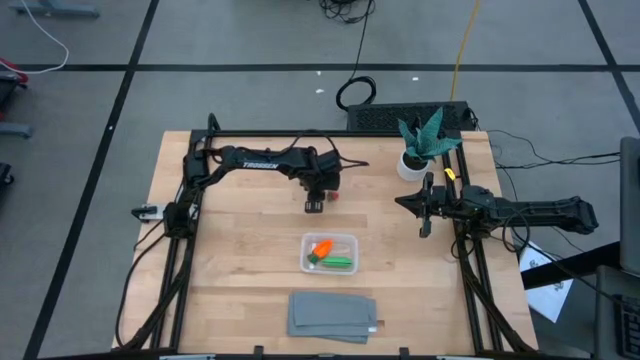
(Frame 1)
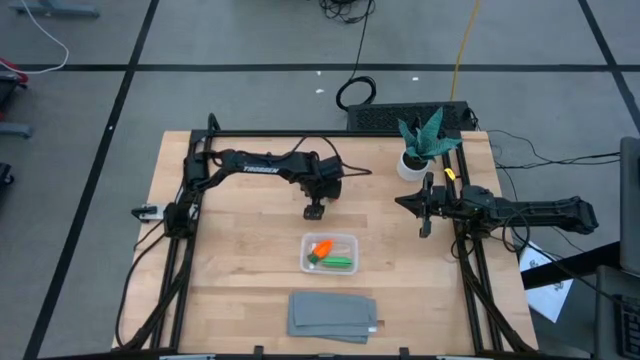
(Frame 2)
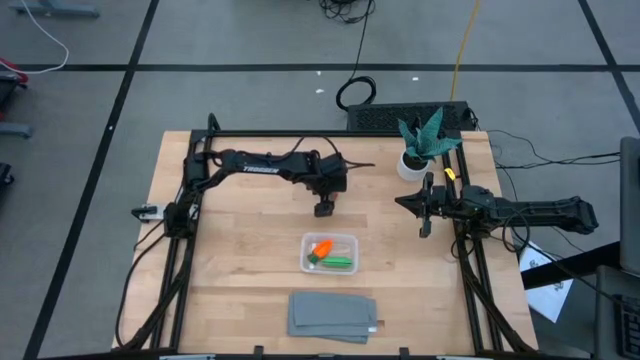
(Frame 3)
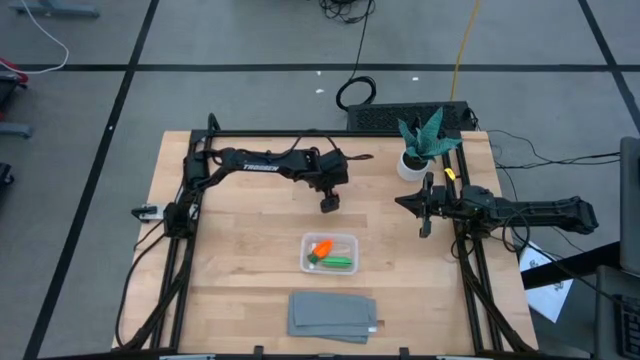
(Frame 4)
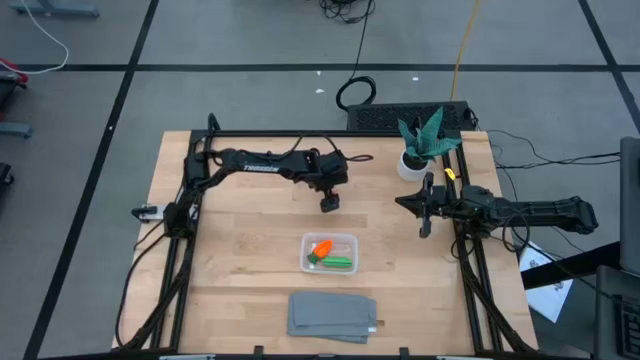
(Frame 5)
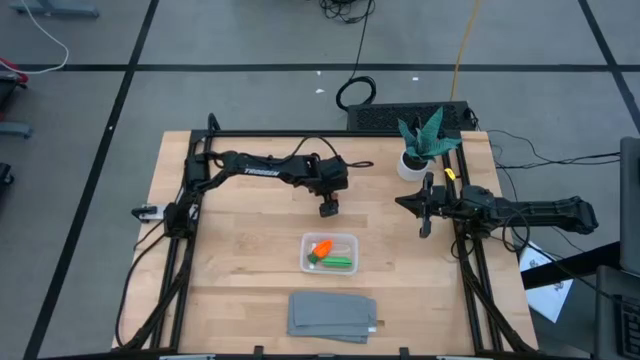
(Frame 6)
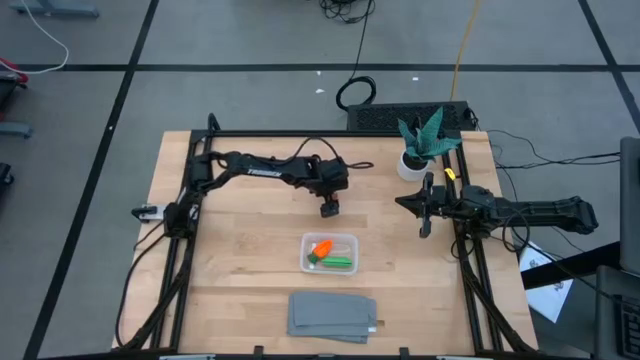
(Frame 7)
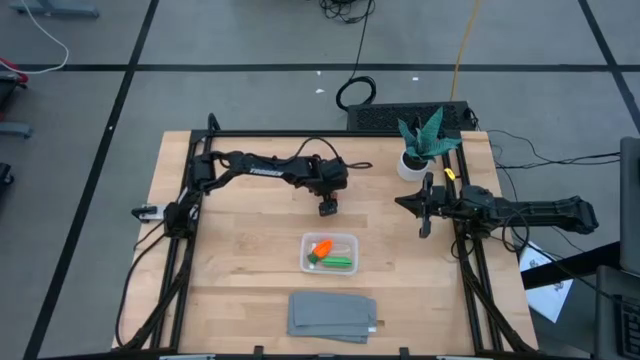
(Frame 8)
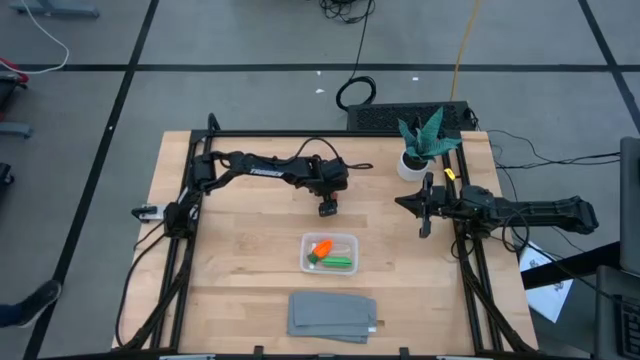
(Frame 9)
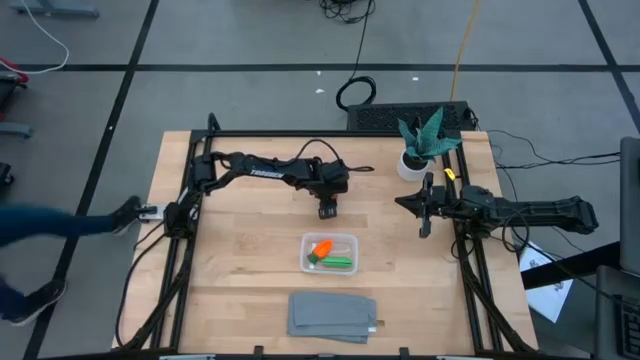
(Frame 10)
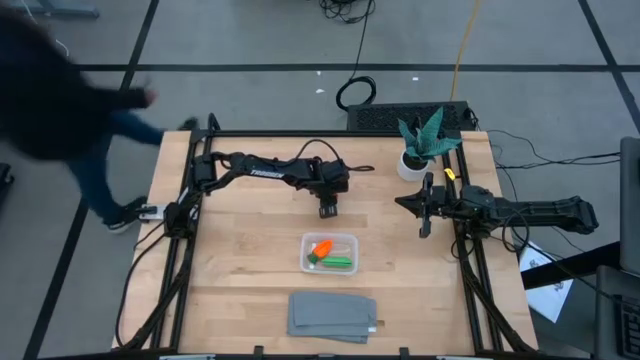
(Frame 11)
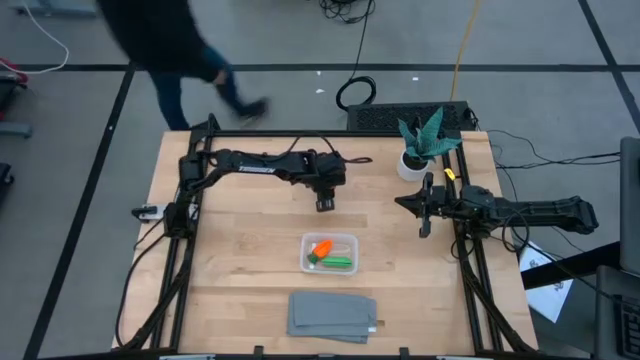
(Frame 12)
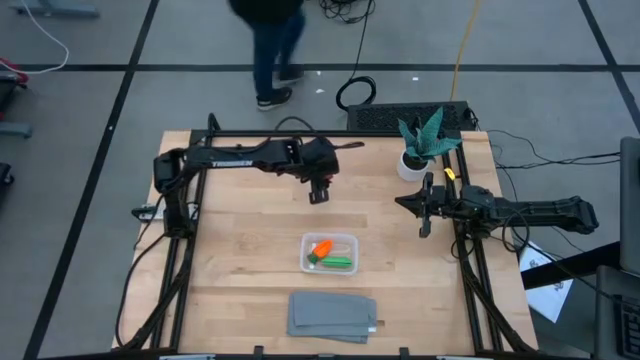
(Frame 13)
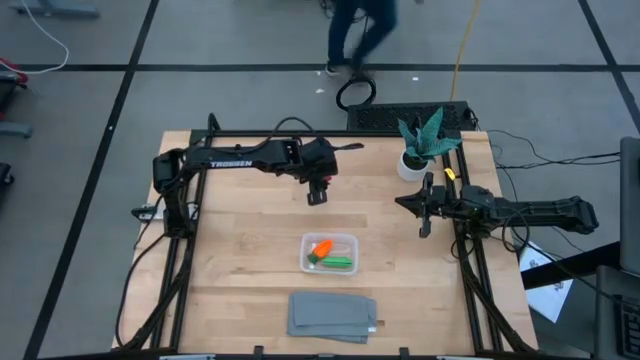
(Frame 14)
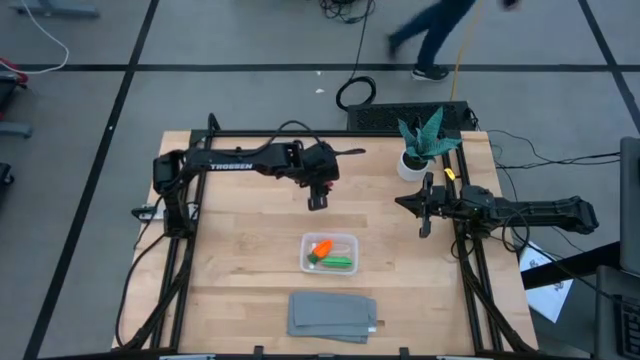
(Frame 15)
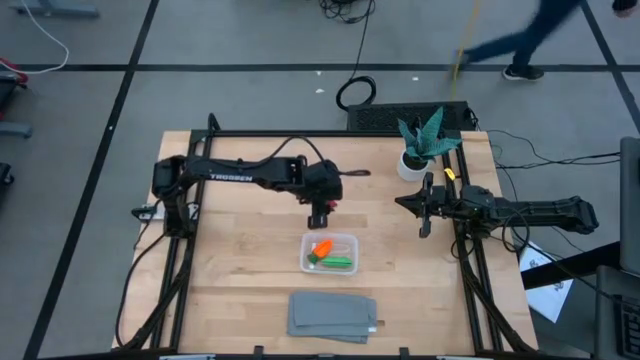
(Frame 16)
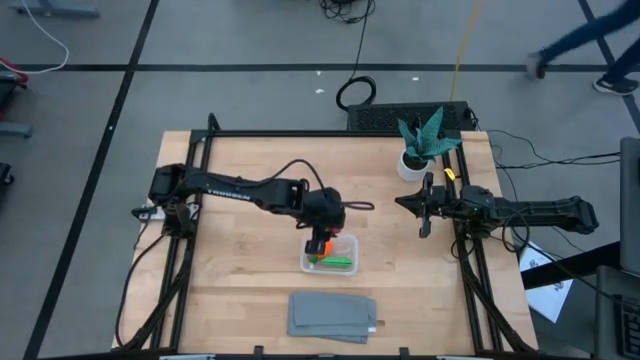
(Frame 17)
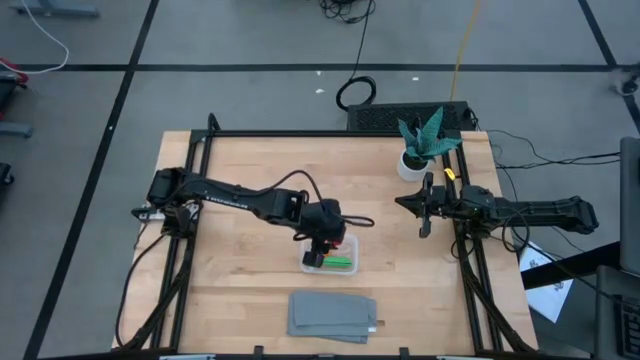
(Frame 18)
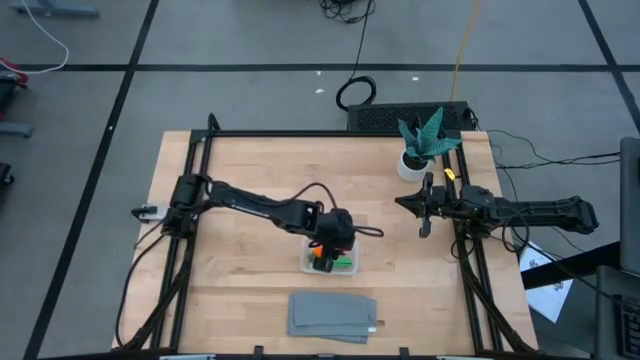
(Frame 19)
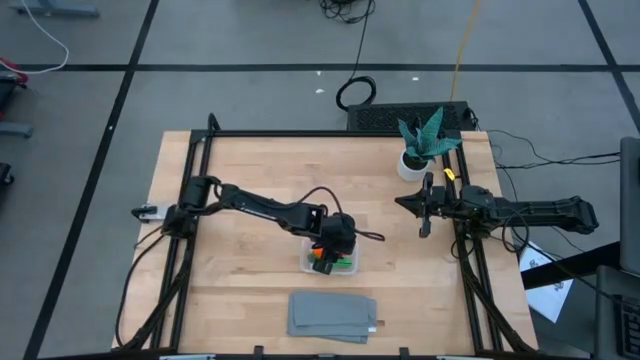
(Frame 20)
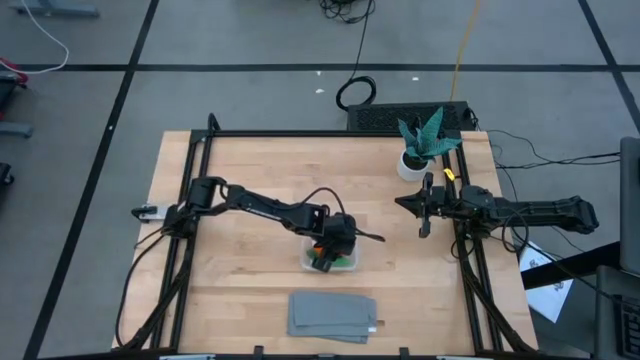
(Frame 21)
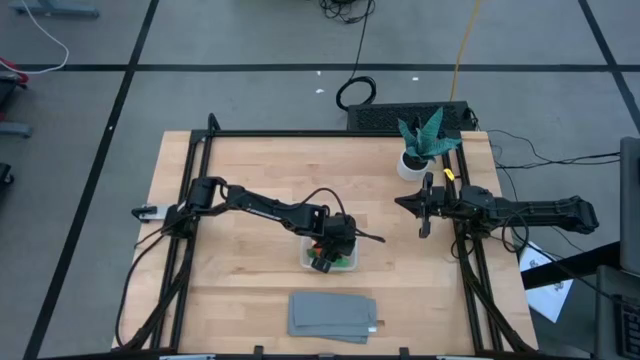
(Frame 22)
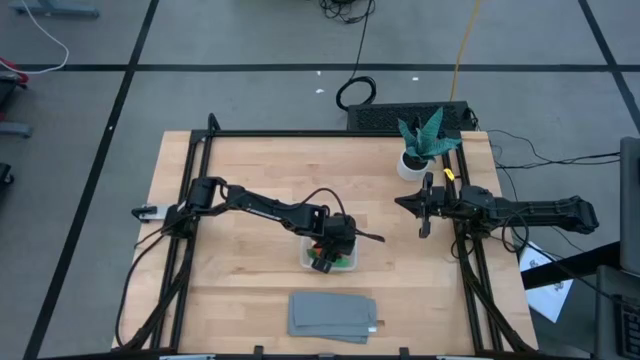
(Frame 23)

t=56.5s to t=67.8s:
Task: Pick and placing Produce into tupperware
Put the strawberry into the transparent bin

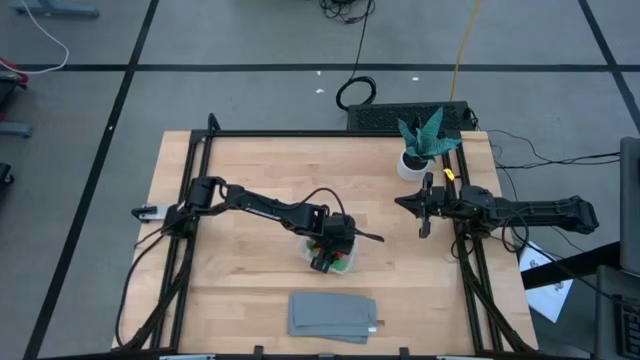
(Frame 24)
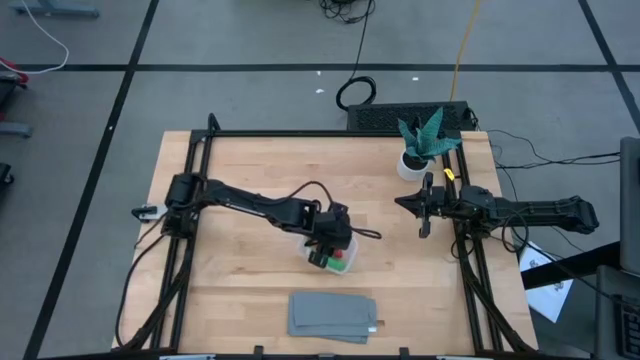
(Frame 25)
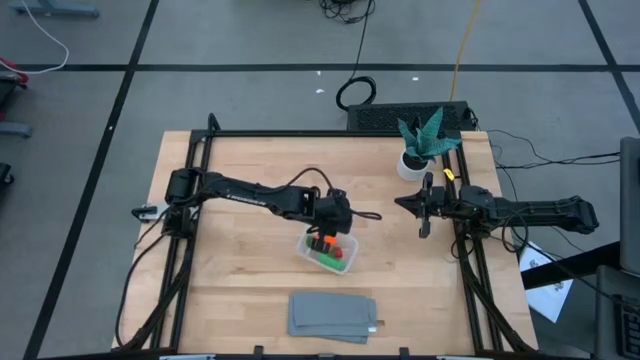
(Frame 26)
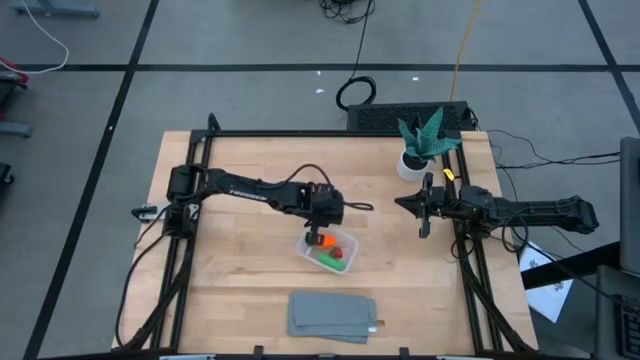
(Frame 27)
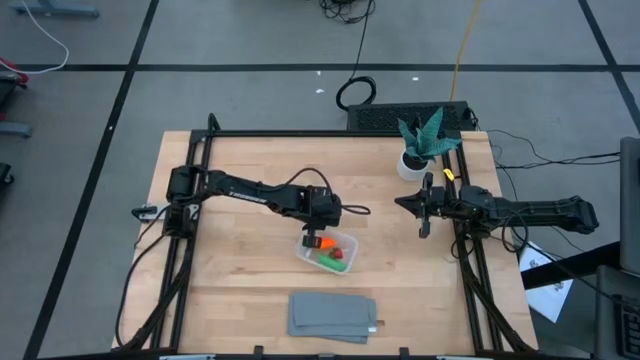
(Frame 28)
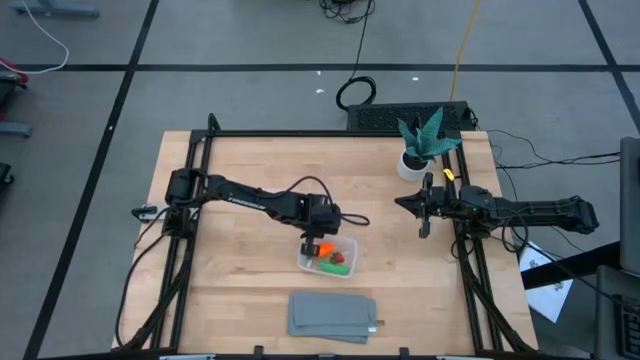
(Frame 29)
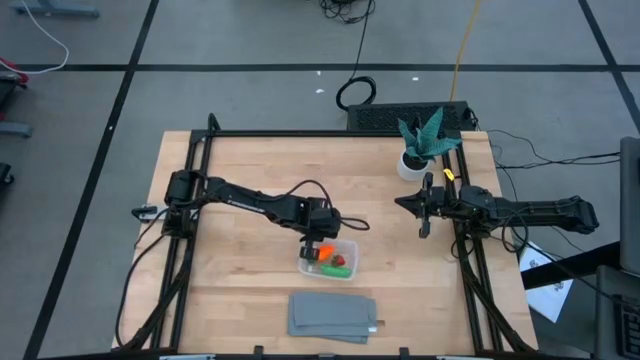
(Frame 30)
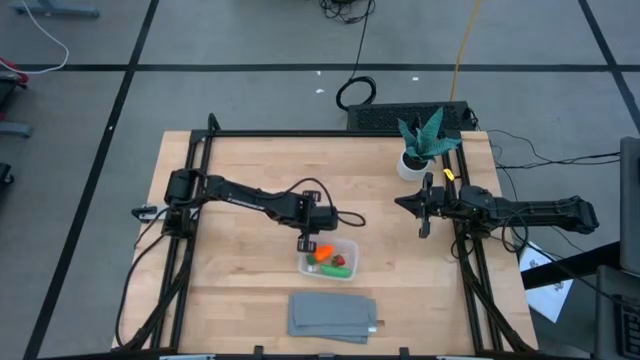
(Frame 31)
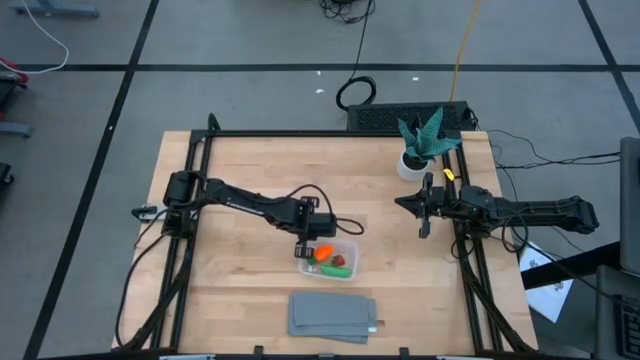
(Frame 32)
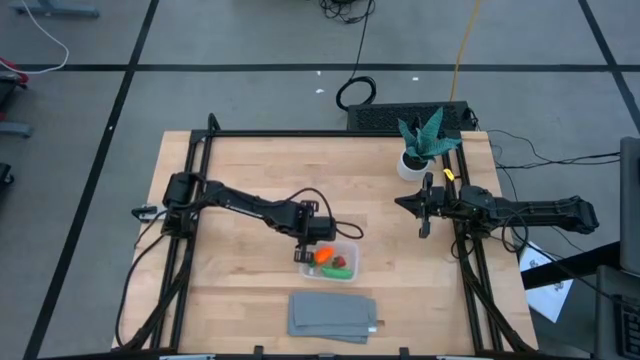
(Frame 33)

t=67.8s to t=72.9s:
Adjust the transparent bin

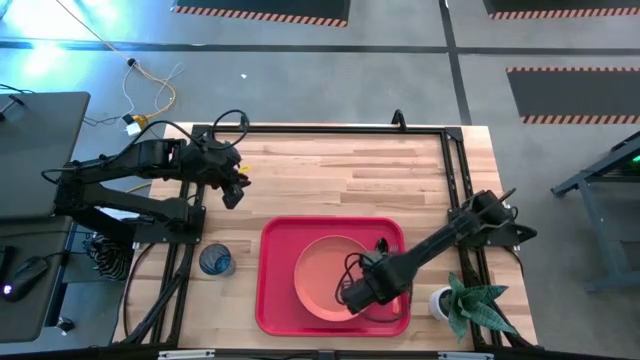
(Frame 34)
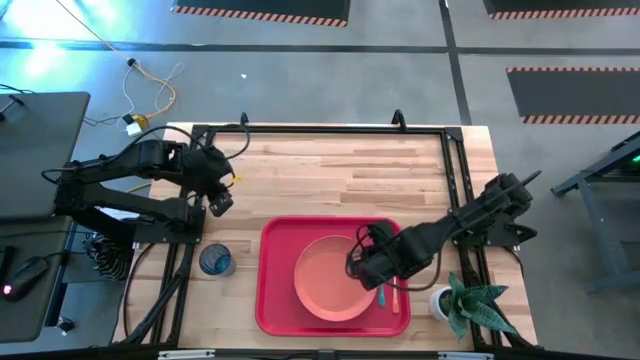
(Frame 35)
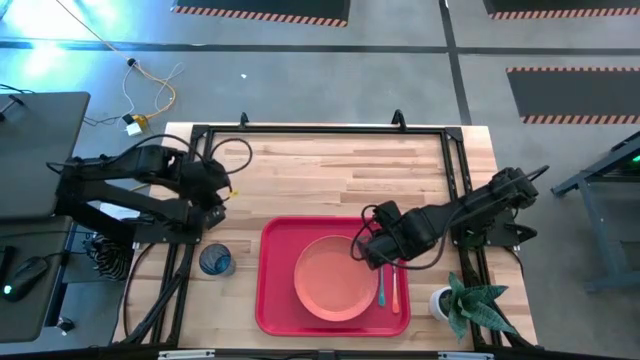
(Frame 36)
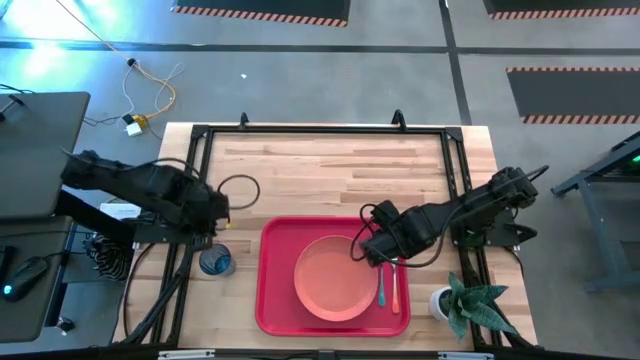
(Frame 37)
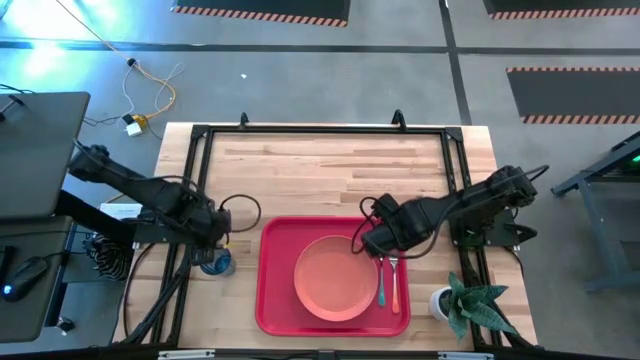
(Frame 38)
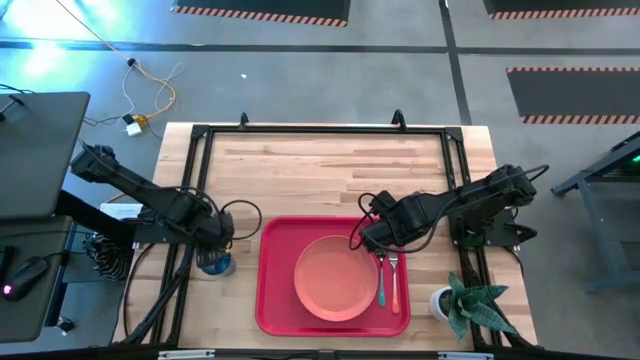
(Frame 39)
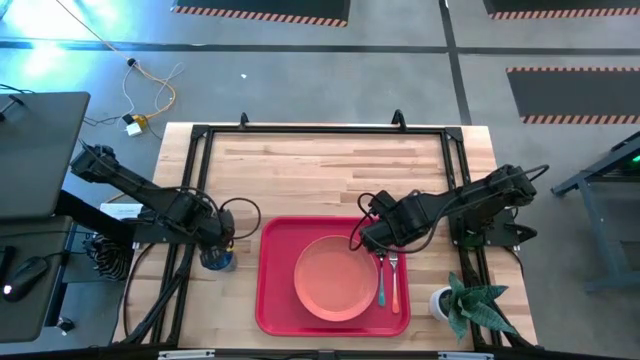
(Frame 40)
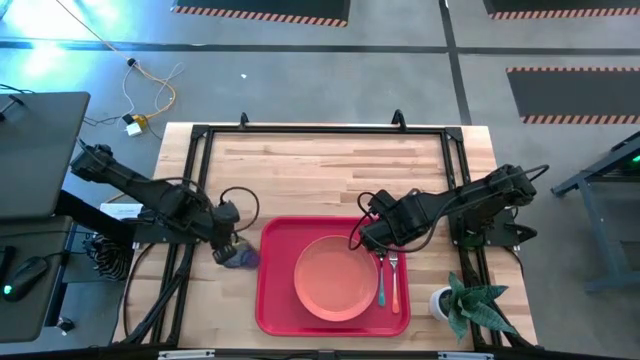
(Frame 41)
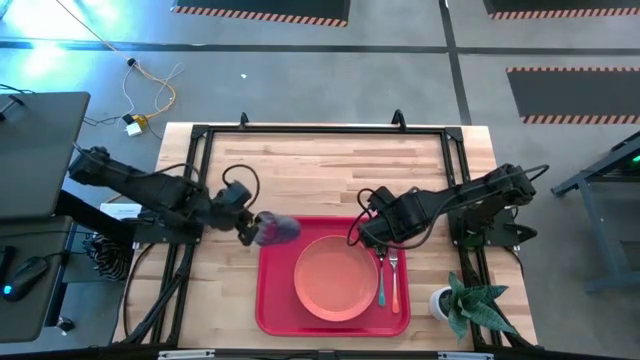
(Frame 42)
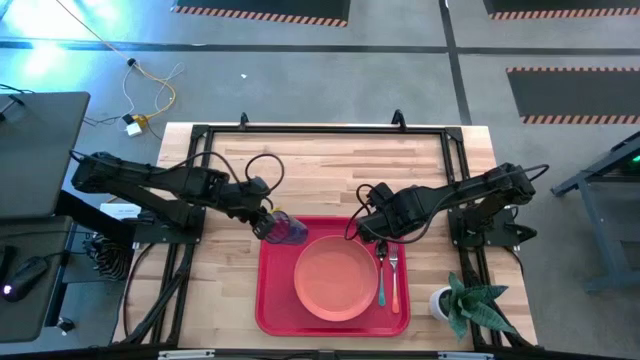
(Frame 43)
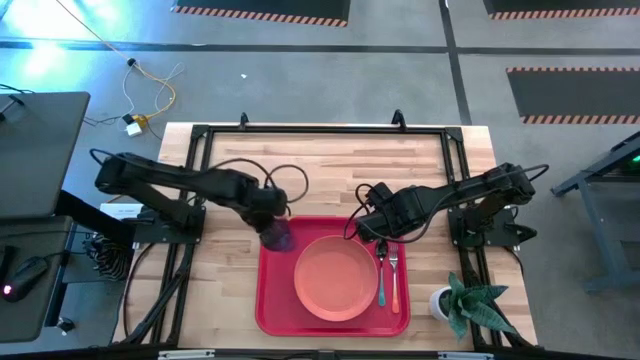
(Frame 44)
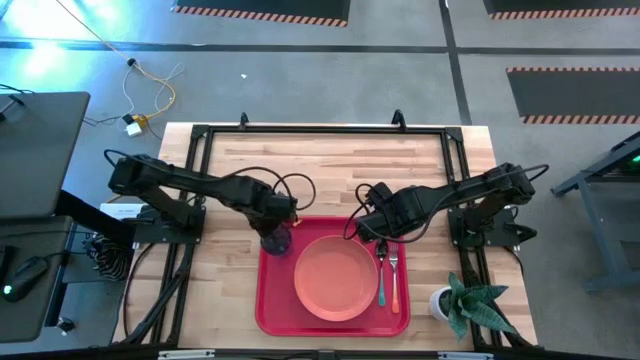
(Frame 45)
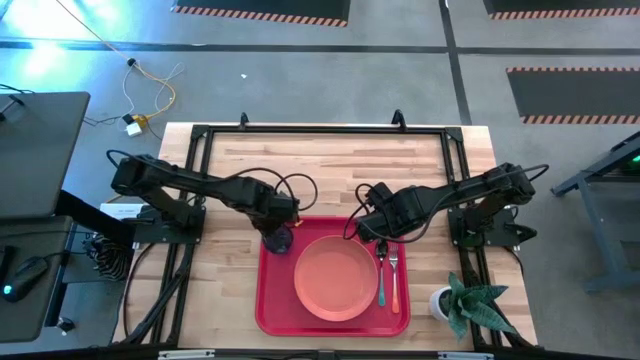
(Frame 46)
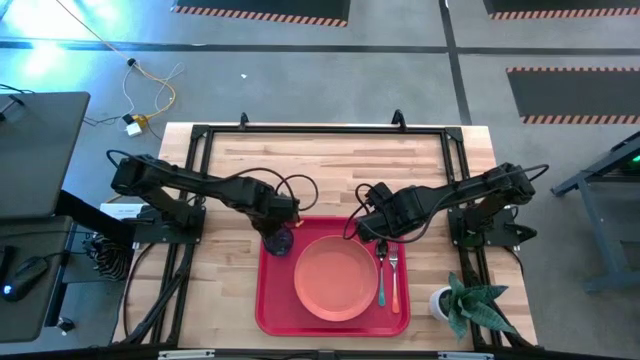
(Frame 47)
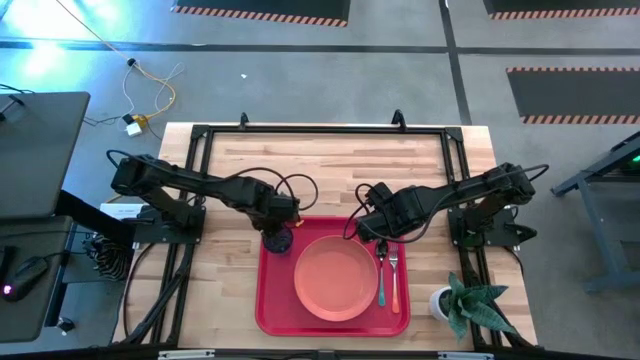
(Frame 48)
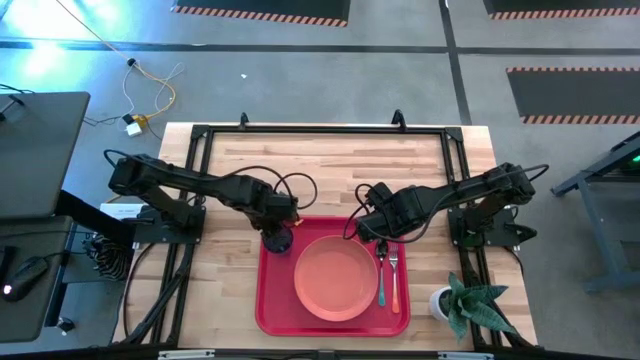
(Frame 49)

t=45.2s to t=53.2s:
Task: Pick and place plate/cup/fork/spoon on tray
Put the blue glass on the red tray to the top left of the orange plate
